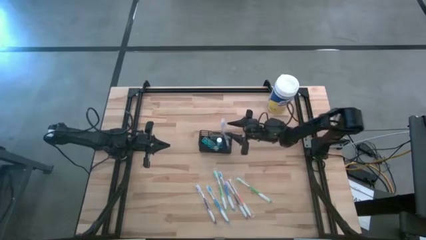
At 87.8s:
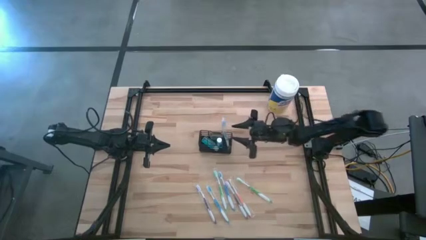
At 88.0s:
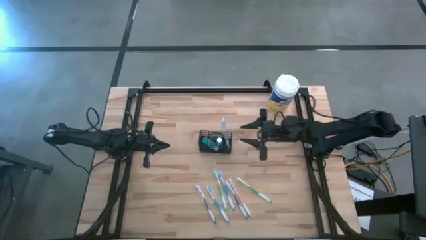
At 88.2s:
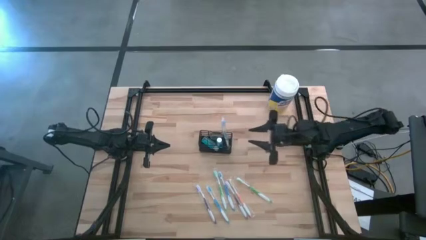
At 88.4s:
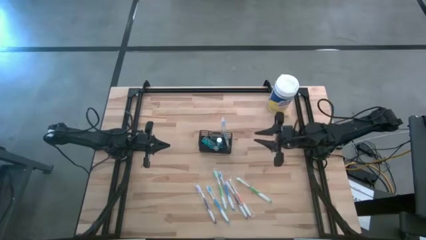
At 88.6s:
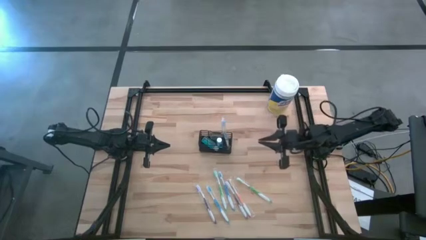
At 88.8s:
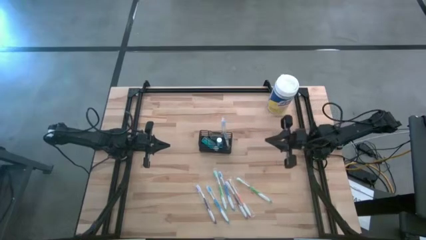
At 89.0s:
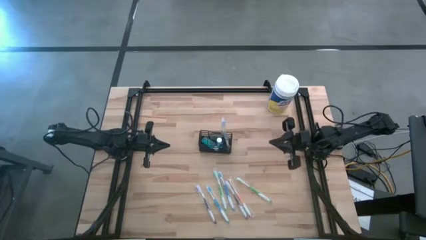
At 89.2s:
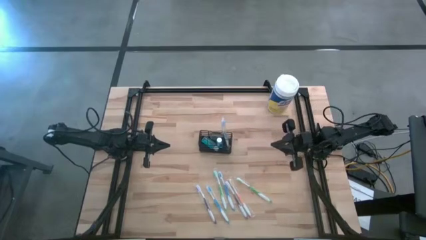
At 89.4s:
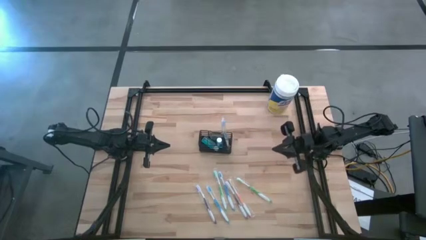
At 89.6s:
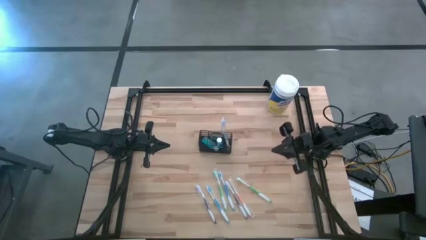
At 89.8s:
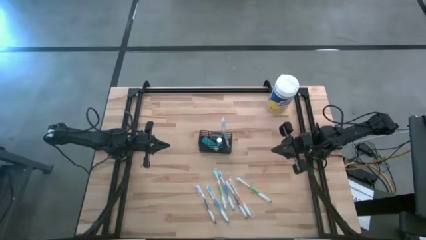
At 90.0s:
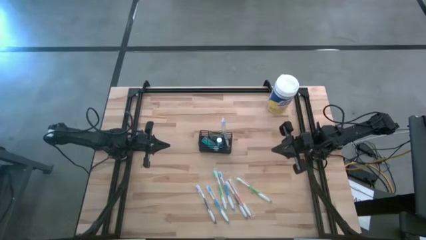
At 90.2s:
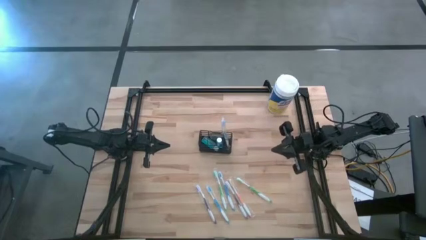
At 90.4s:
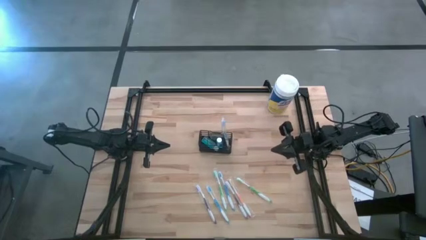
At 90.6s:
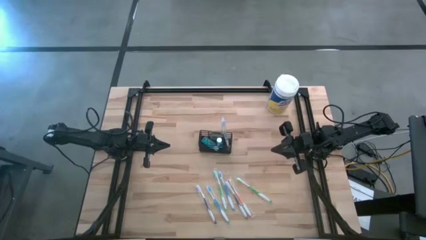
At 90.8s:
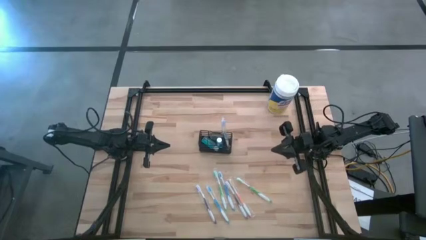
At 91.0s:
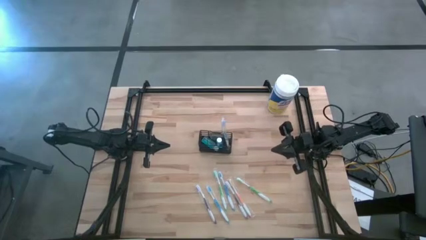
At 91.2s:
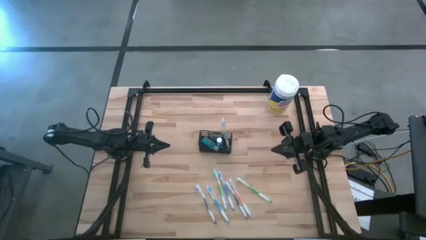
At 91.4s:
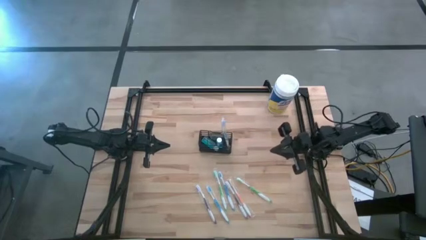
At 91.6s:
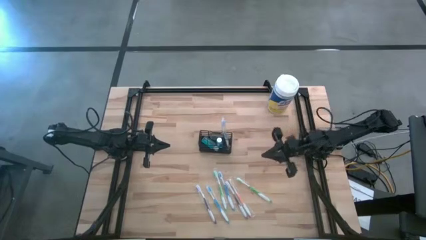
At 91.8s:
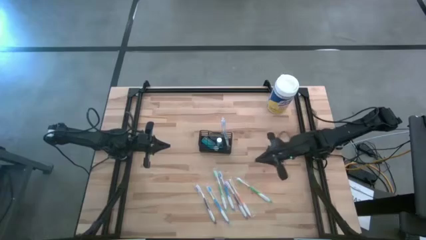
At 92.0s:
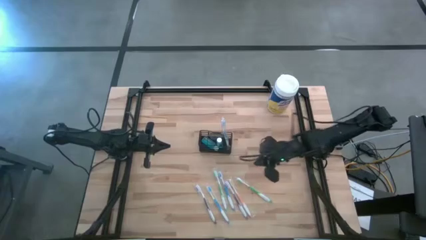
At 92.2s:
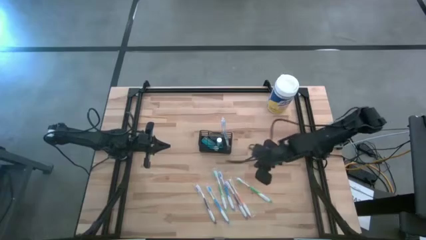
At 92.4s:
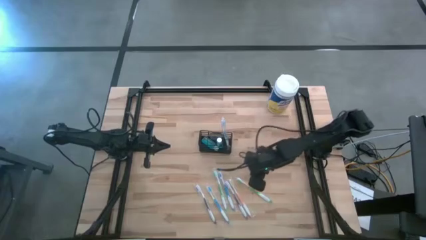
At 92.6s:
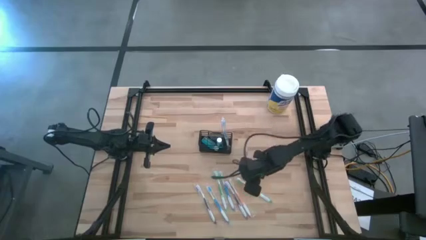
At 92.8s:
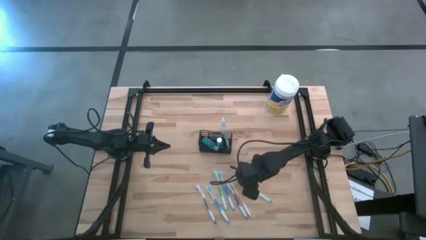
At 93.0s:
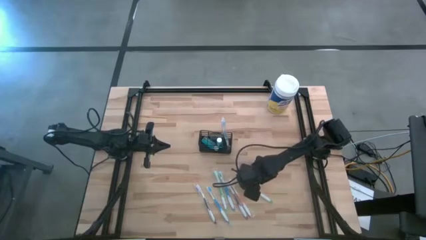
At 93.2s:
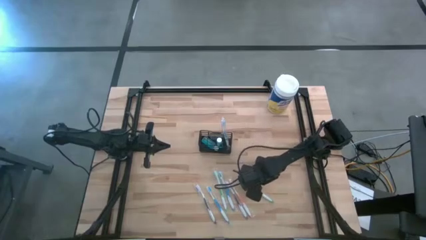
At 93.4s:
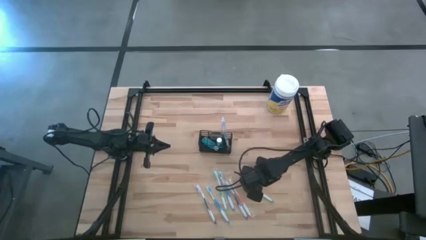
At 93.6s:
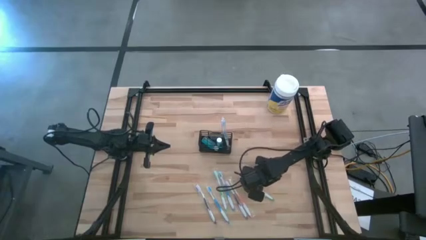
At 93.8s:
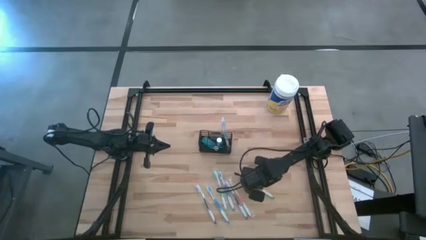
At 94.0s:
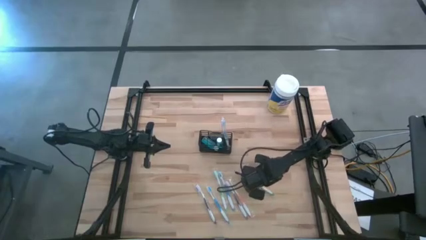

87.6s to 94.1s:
Task: Pick & Place toothbrushing station
Put the right green toothbrush into the black wire organizer

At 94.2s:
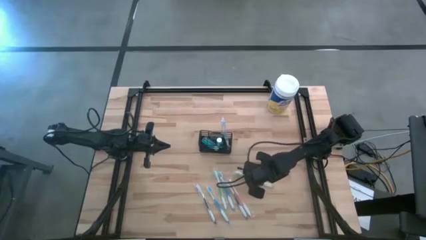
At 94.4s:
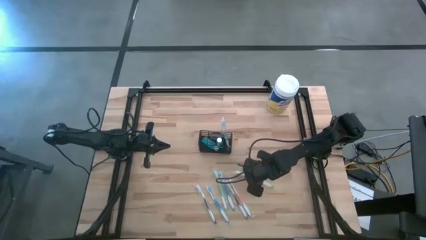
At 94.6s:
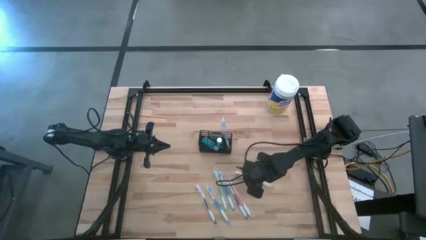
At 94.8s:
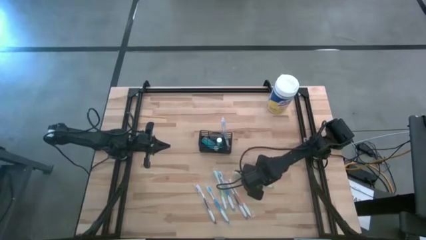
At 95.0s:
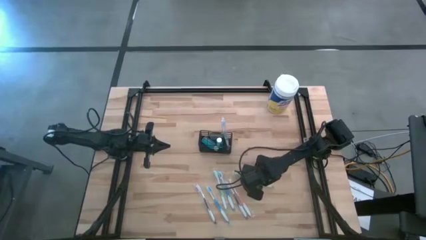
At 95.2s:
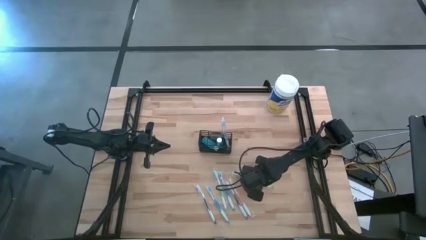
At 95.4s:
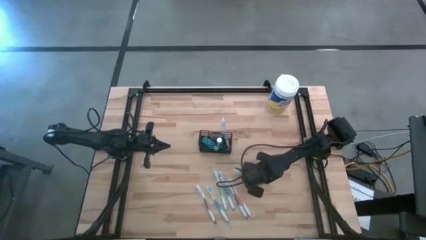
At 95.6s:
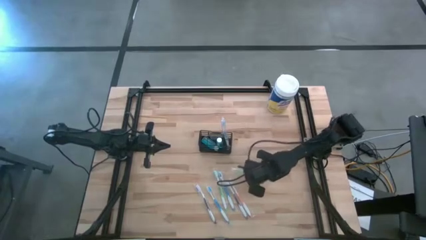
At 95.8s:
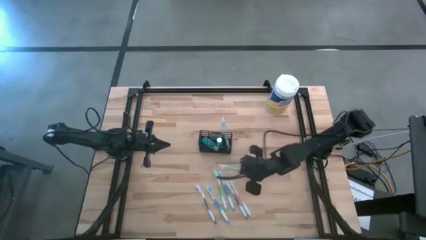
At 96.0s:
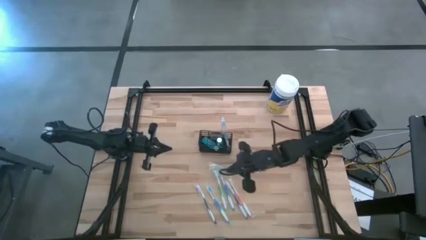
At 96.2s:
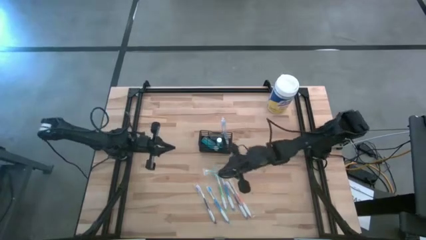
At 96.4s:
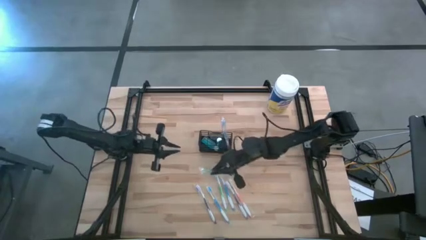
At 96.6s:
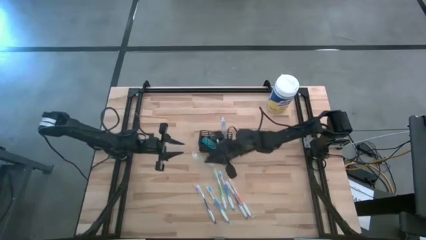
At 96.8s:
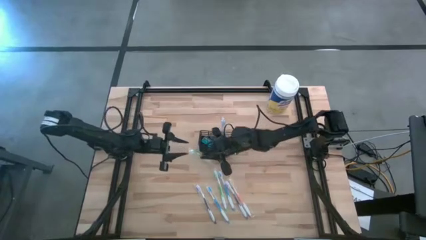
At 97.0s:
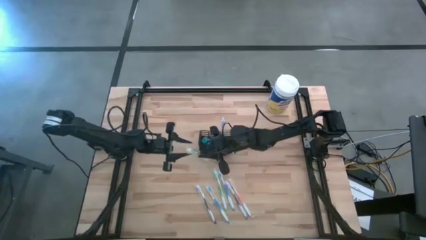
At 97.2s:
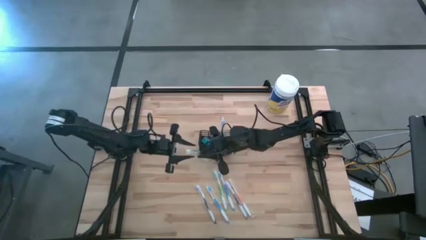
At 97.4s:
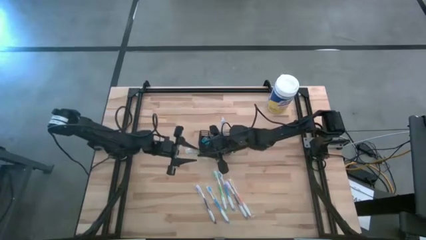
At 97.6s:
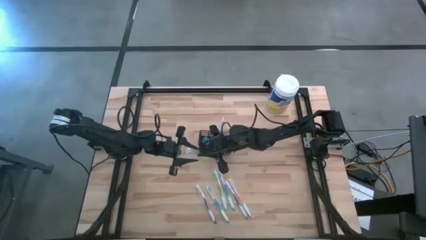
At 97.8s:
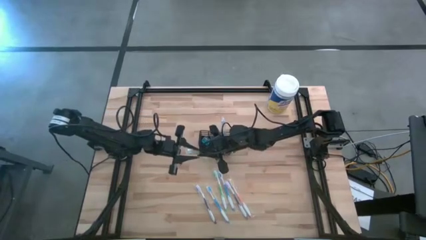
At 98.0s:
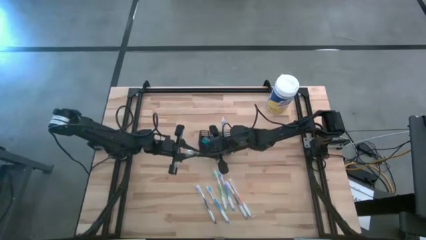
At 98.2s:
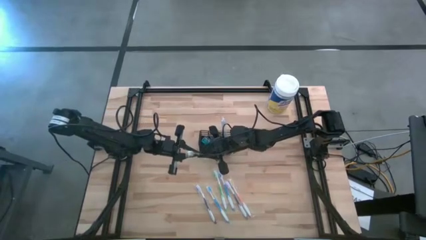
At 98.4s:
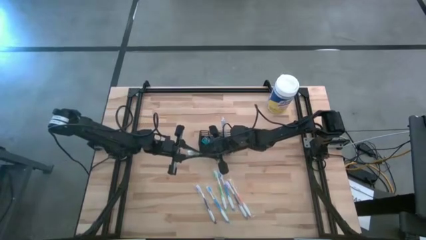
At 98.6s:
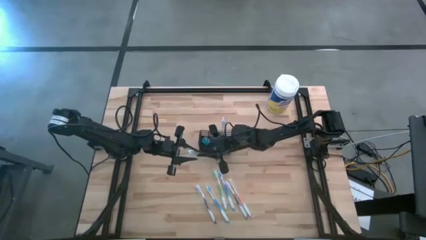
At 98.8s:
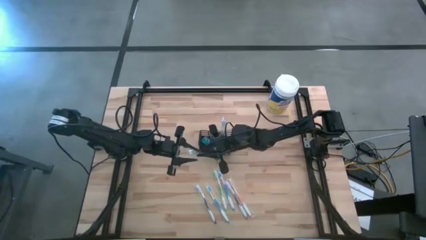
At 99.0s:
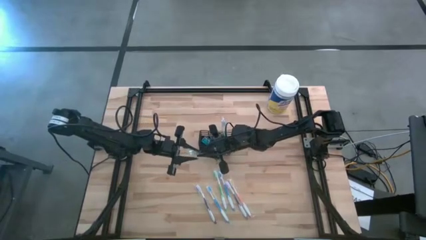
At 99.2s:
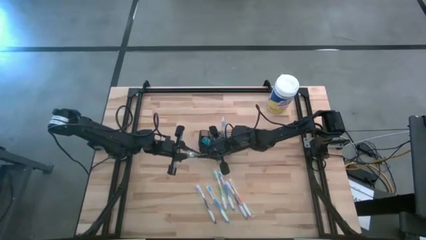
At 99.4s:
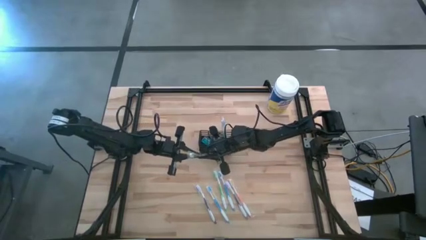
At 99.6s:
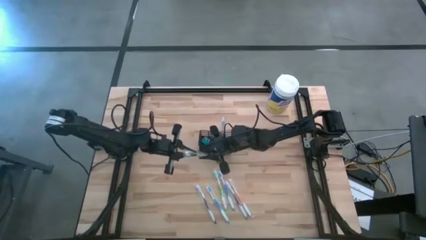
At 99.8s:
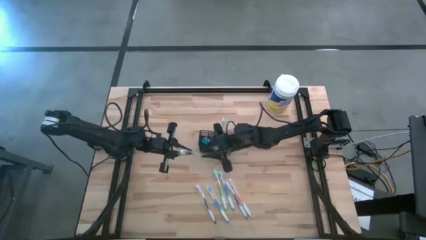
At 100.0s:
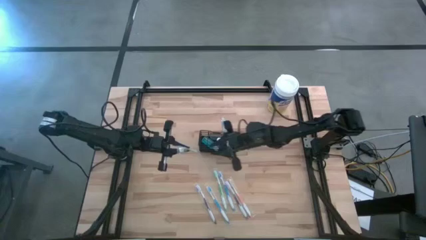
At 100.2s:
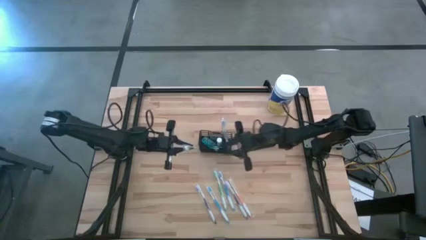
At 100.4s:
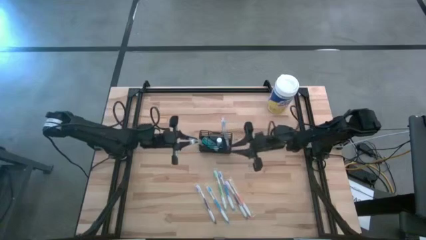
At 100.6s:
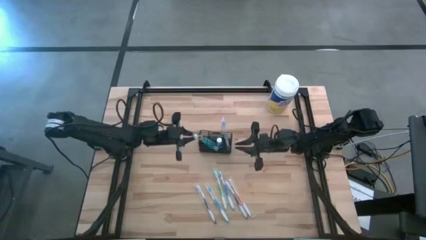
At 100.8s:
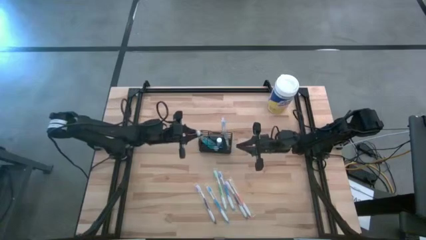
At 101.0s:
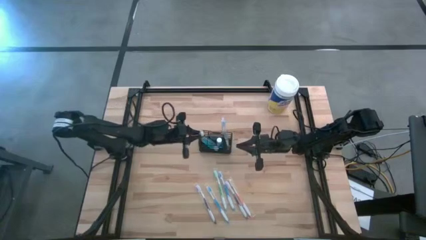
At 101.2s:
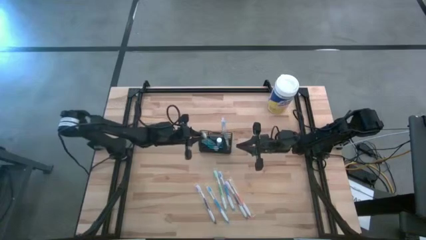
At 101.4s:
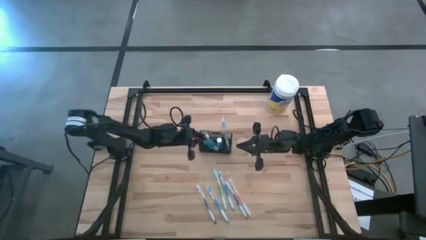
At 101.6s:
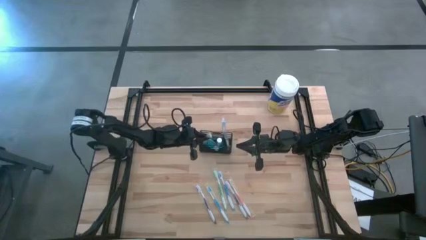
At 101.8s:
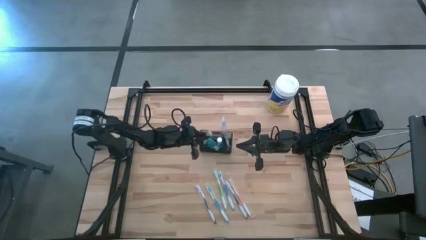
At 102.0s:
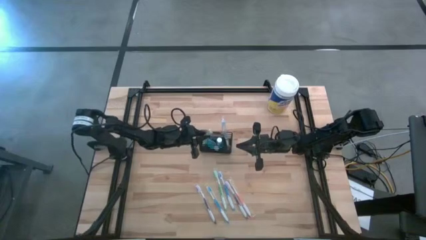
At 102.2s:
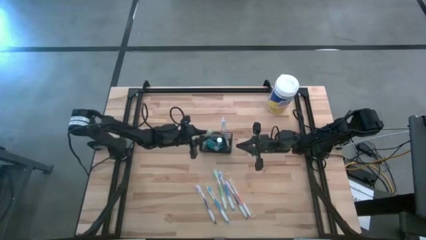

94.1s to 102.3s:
Put the right green toothbrush into the black wire organizer

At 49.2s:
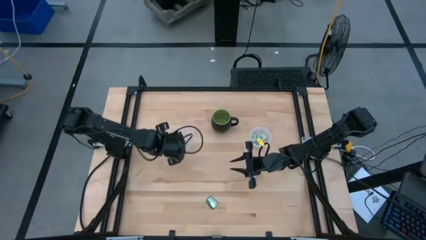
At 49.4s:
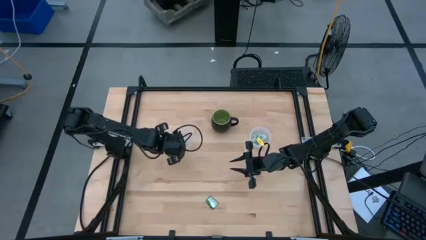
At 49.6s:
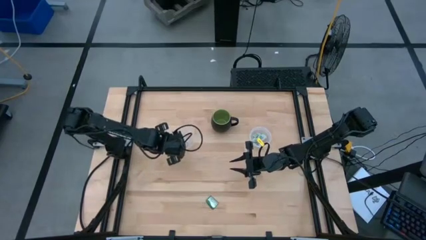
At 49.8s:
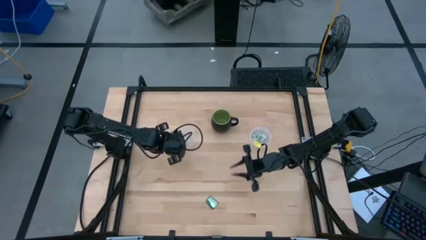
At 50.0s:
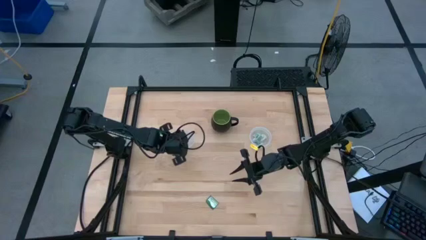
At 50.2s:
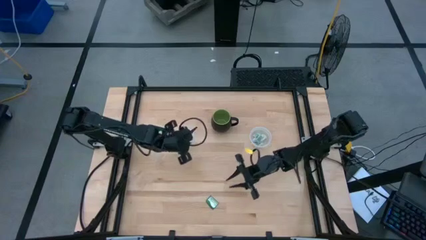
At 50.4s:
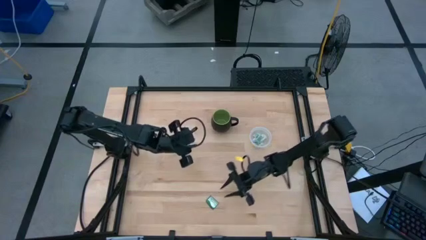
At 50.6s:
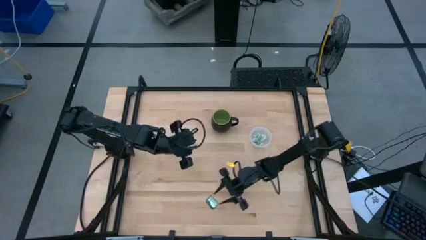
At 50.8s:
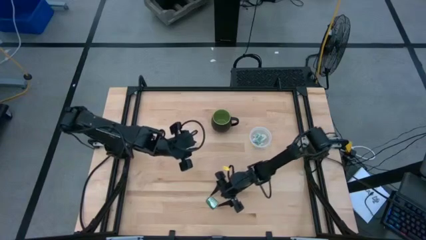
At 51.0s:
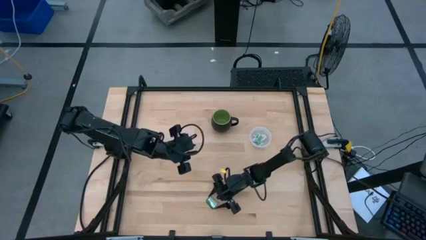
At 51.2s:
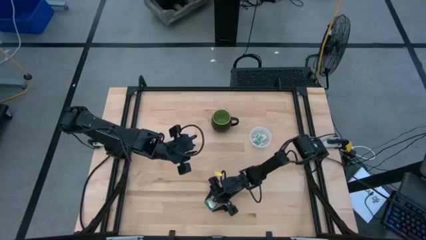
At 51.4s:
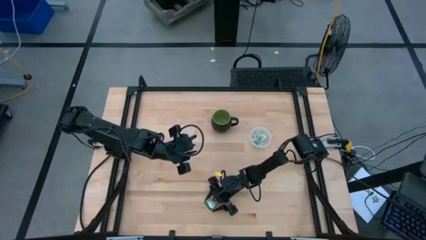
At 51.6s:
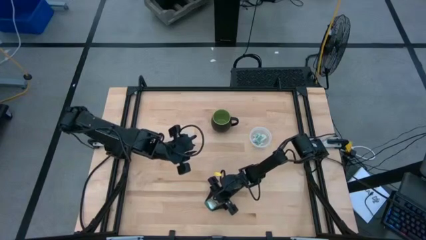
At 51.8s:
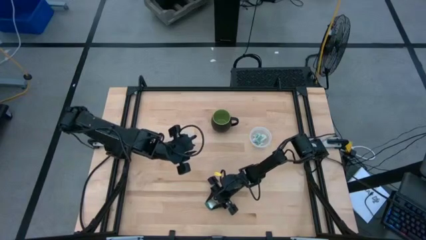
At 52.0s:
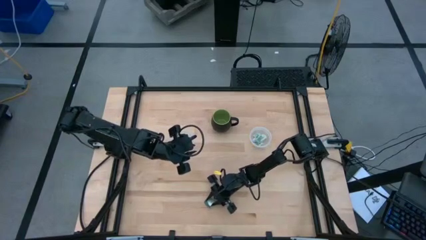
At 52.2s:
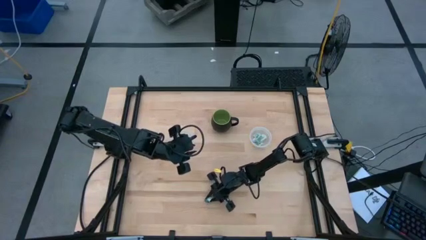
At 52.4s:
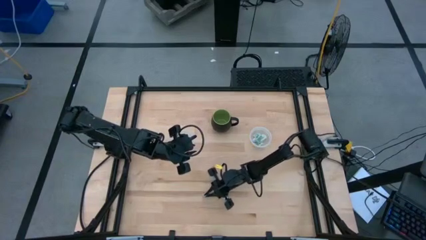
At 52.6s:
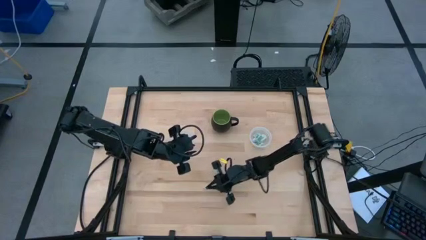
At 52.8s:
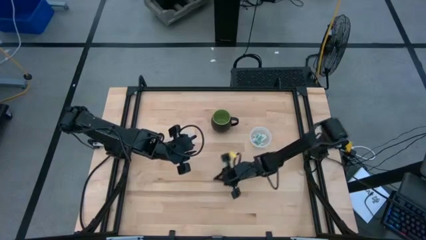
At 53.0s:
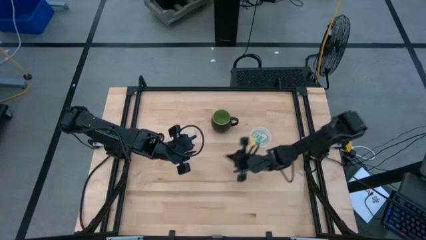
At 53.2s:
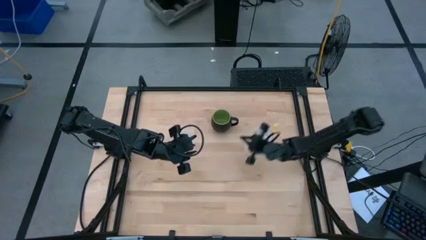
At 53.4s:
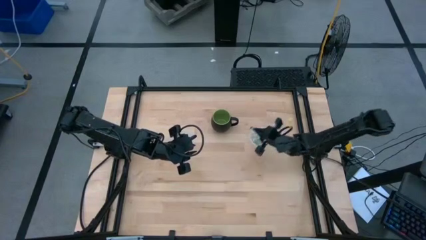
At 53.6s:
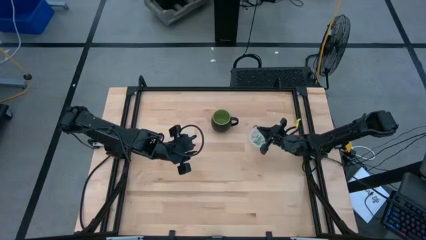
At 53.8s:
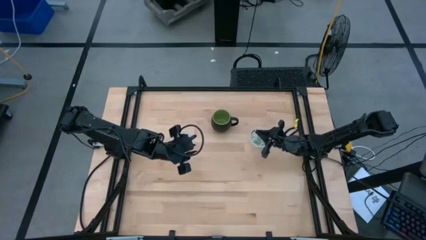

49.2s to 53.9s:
Task: Pick and place Stevia / Truvia into bins
Put the dark green truvia packet into the right transparent container
